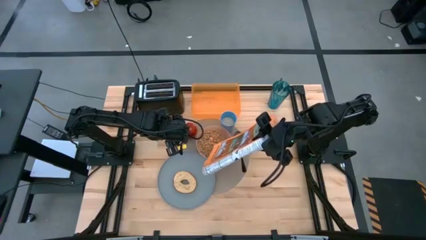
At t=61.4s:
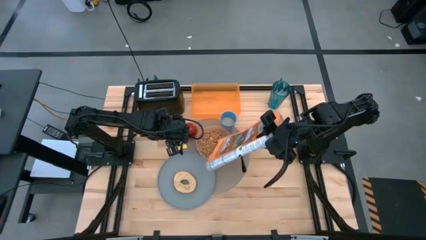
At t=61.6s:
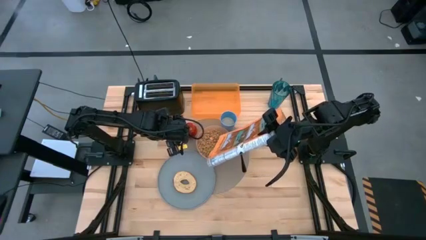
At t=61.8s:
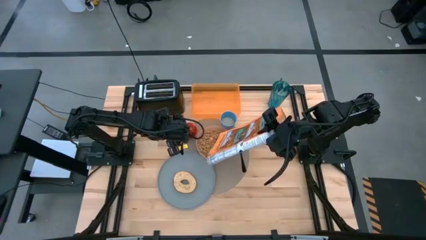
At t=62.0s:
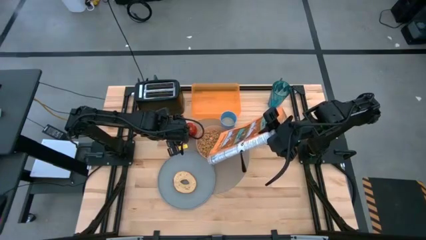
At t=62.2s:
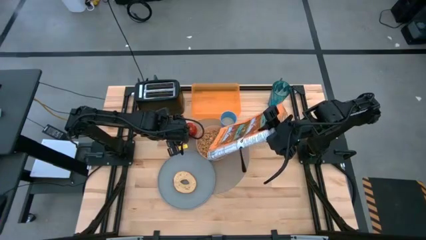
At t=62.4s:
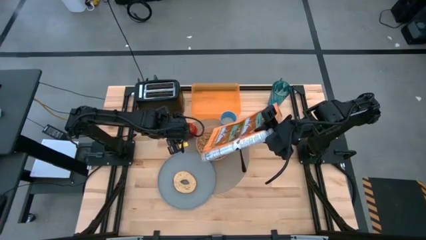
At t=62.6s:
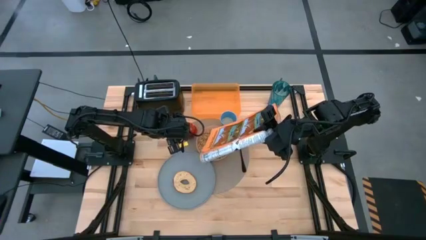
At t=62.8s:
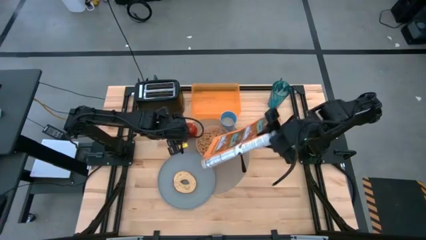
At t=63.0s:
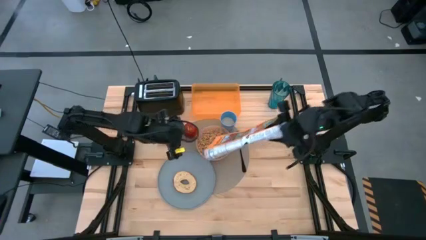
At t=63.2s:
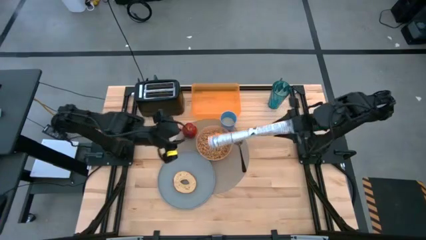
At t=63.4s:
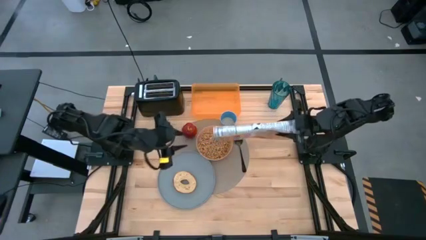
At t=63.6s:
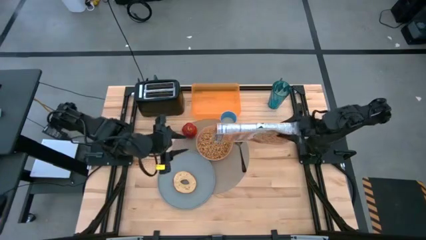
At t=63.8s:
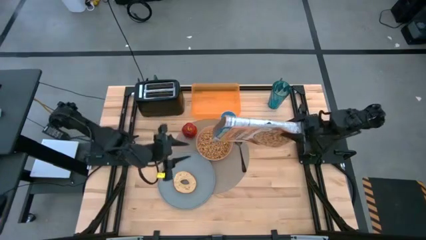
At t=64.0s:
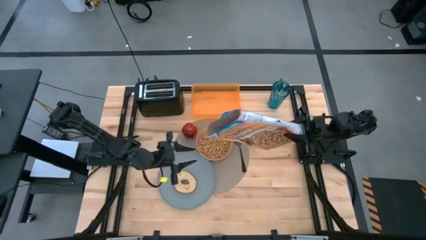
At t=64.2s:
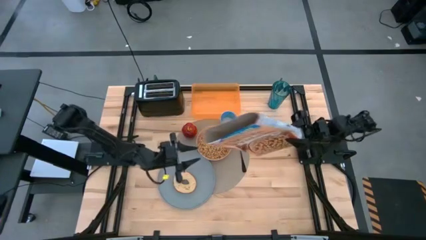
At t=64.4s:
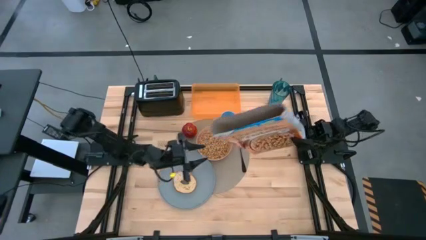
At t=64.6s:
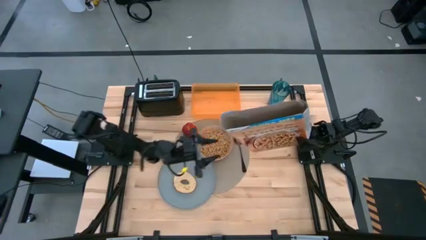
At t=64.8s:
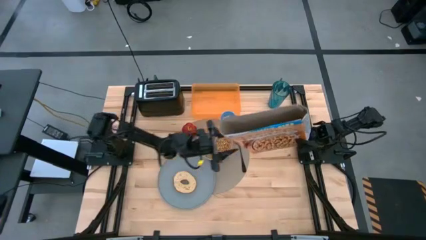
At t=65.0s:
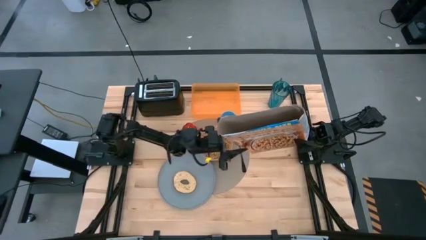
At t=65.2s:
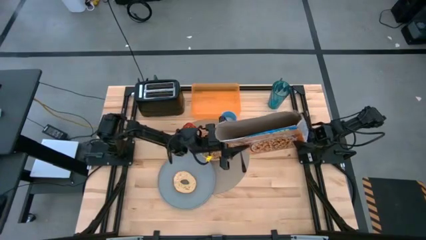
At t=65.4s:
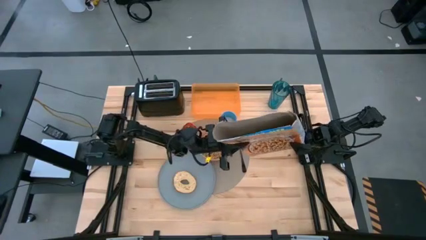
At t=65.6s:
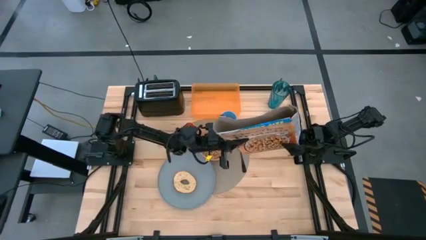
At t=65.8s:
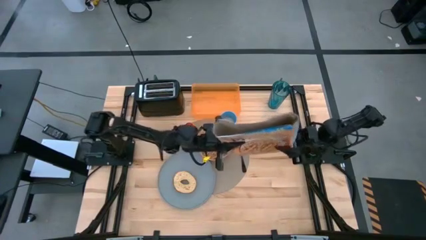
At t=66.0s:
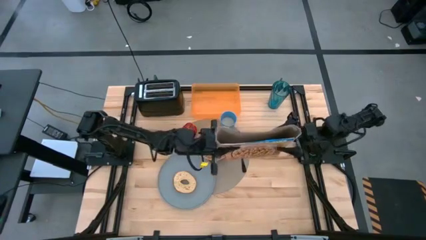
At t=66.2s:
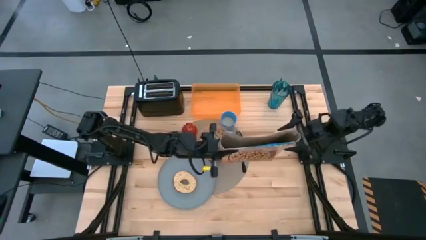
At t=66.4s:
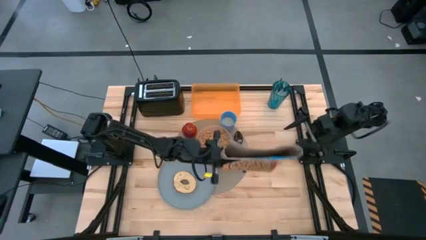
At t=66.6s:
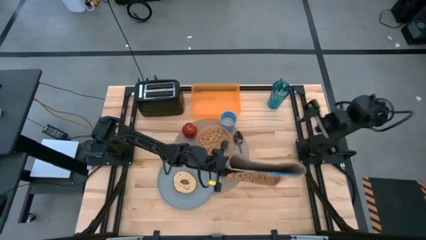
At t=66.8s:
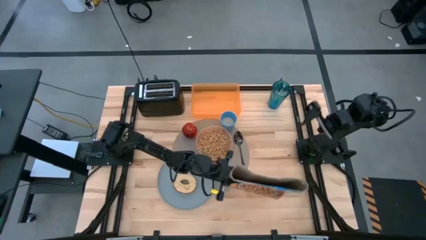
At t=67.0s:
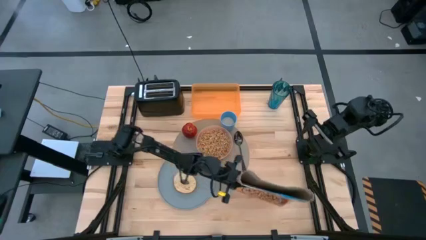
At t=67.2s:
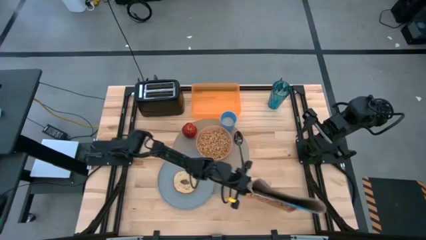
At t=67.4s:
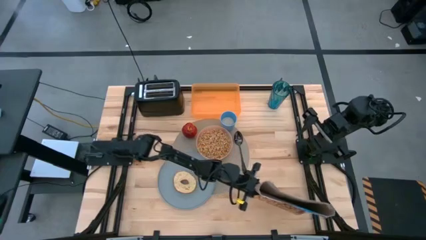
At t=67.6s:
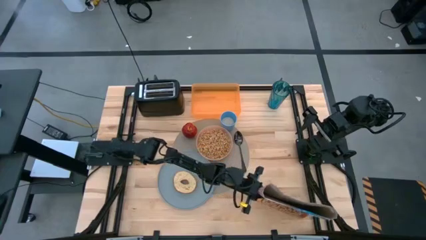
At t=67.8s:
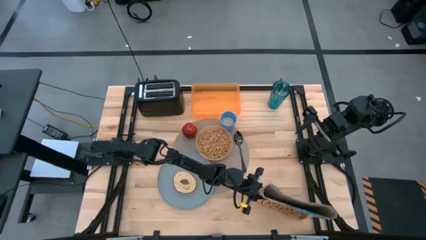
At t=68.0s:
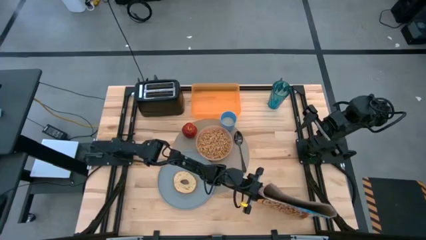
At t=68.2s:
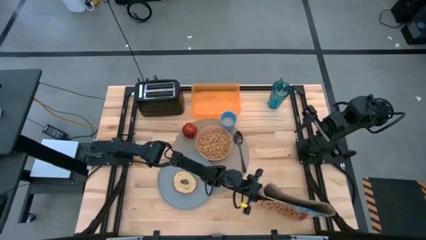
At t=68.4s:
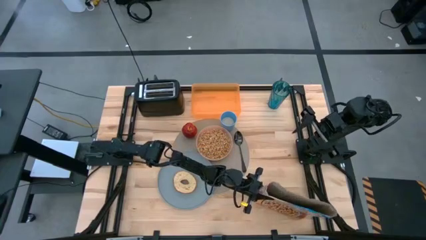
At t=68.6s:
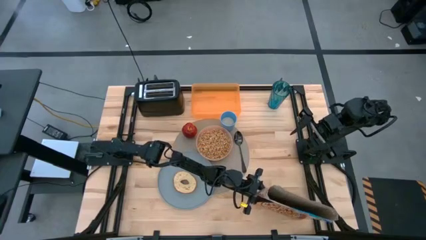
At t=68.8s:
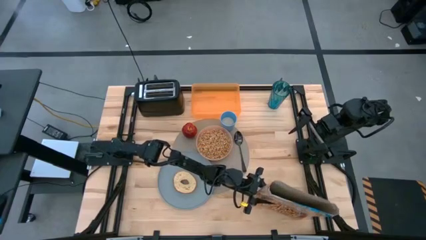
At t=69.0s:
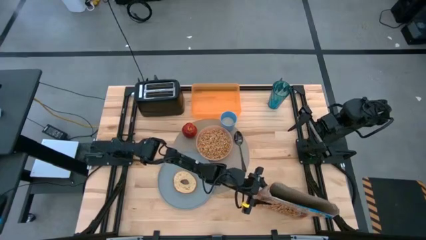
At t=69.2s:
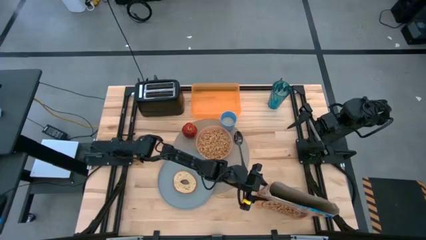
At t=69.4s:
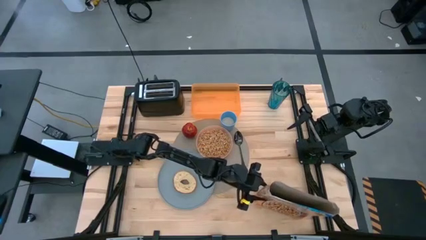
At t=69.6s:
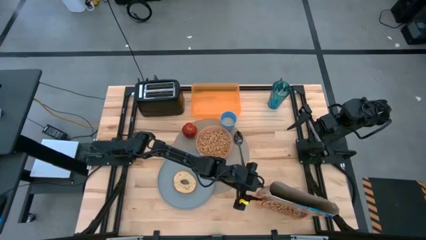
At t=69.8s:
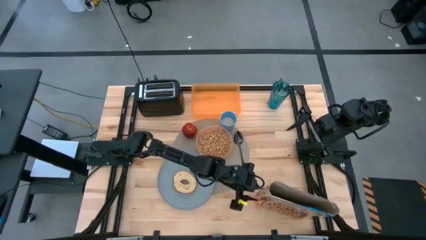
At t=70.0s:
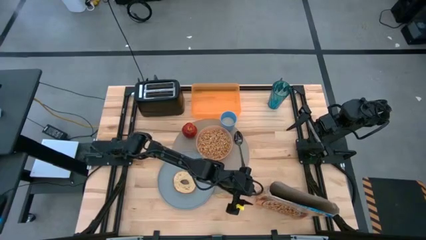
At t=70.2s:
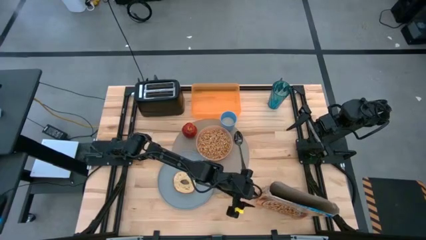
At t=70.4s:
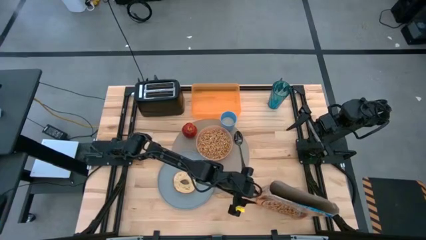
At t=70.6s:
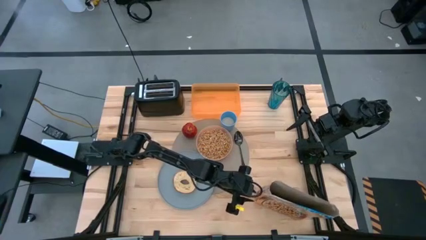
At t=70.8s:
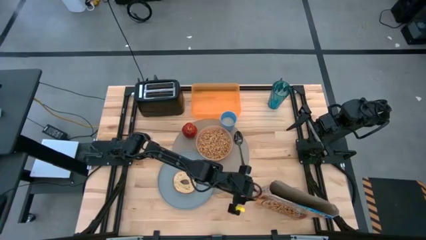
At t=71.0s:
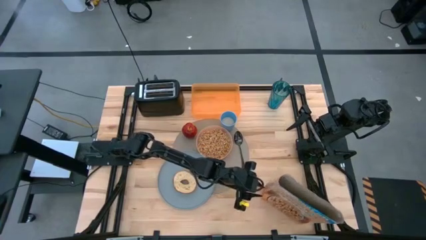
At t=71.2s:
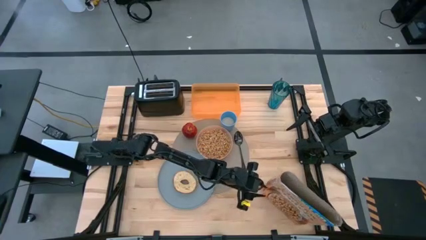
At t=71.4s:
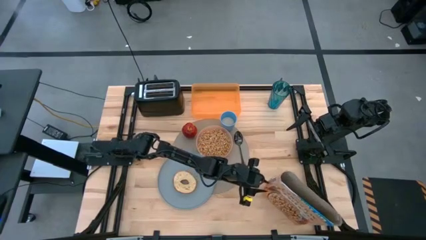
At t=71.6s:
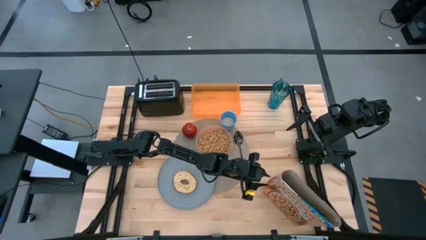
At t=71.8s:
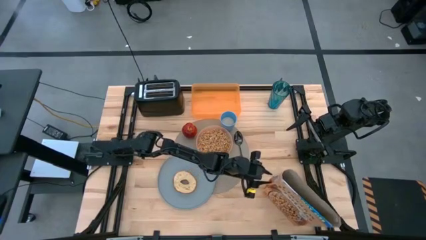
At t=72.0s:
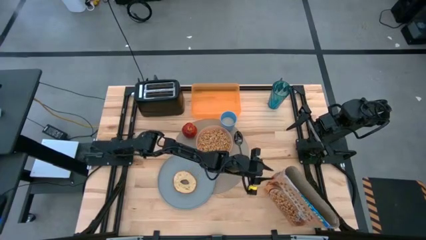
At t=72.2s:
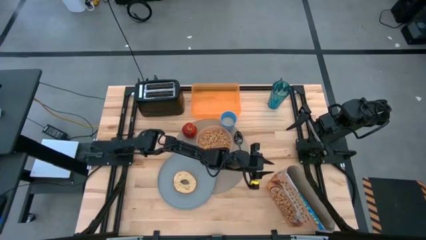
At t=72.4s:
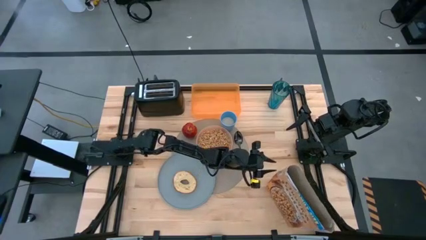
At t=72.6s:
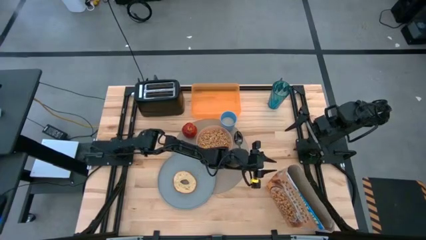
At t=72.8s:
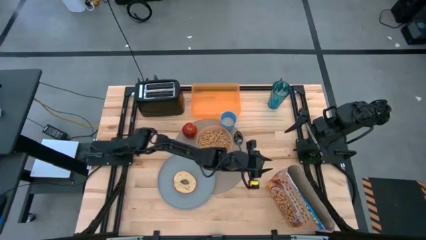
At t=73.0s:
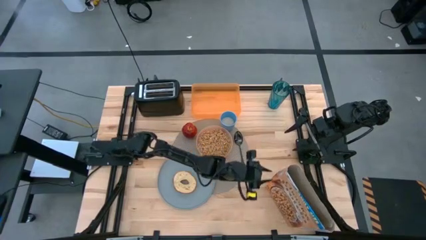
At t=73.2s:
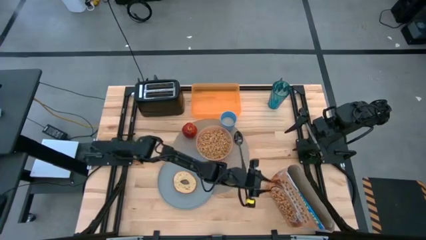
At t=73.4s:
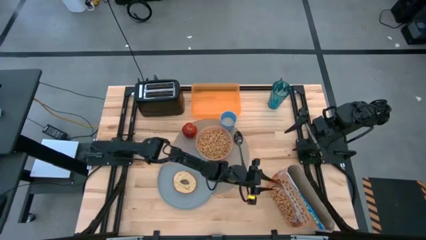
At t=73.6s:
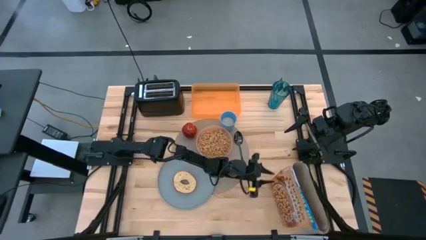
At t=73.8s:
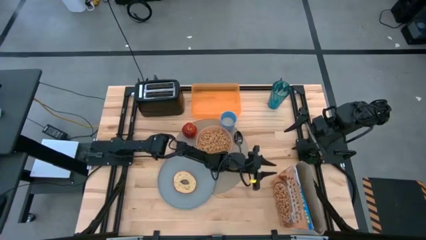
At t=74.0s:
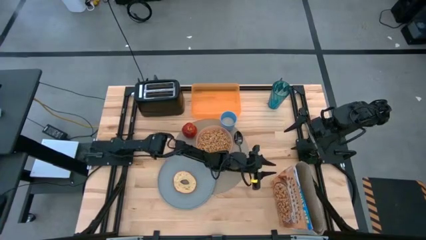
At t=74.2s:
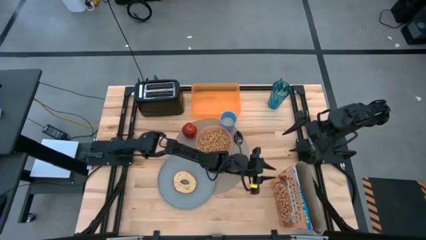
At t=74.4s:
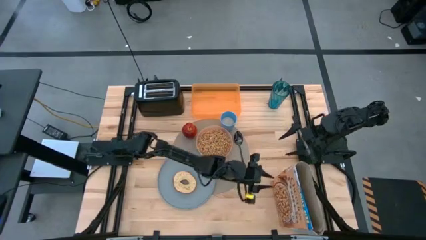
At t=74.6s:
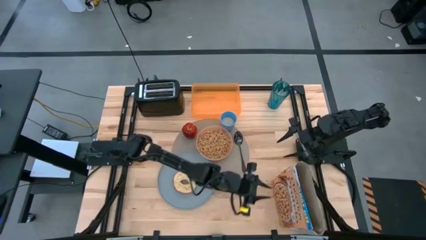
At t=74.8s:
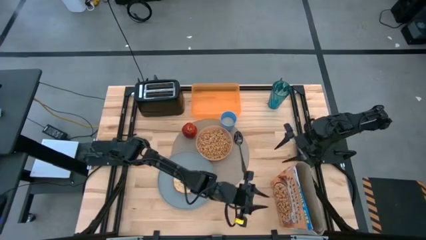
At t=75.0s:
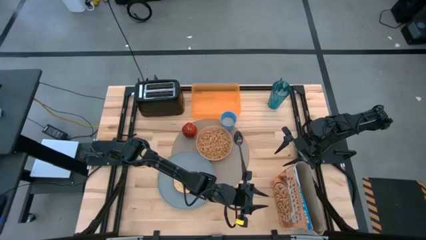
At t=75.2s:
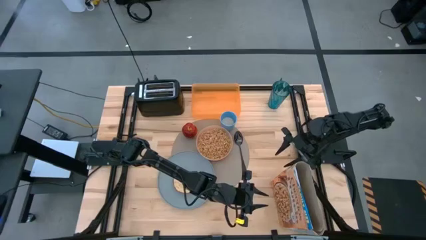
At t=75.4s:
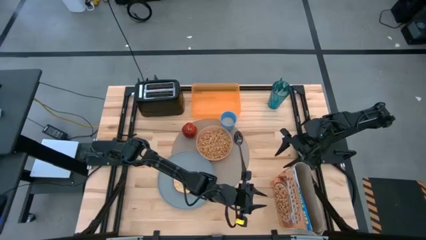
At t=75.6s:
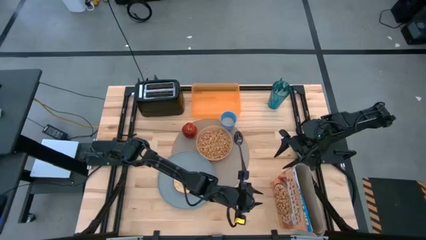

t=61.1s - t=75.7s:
Task: Arrange a breakfast setting
Pour the cereal from the yellow cereal box into the light orange bowl
